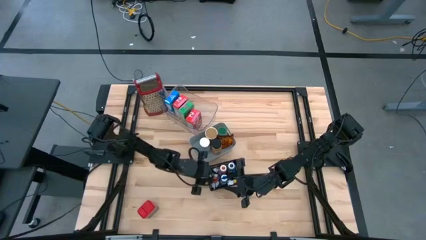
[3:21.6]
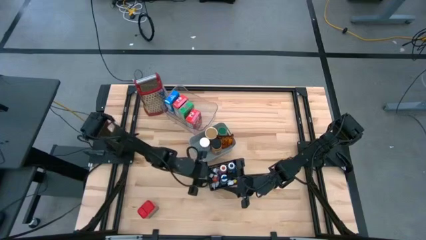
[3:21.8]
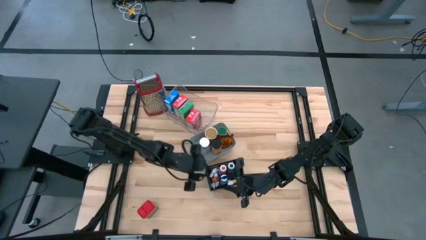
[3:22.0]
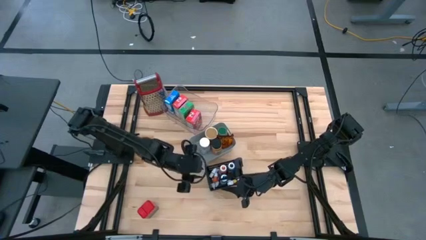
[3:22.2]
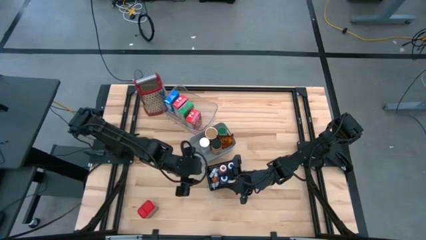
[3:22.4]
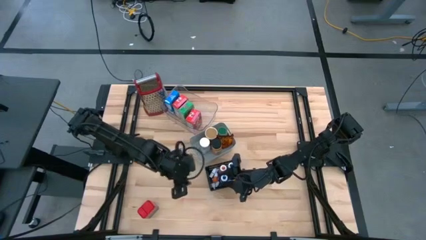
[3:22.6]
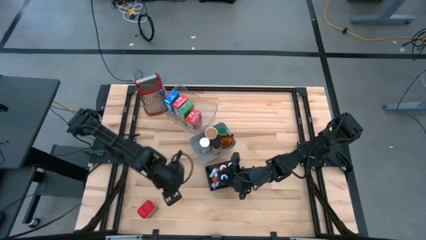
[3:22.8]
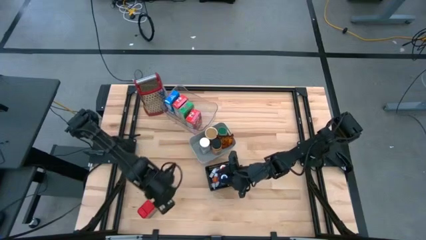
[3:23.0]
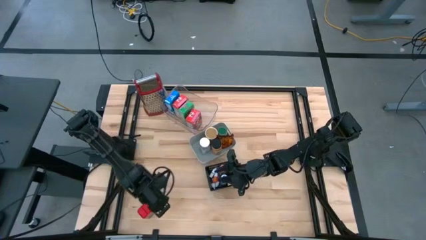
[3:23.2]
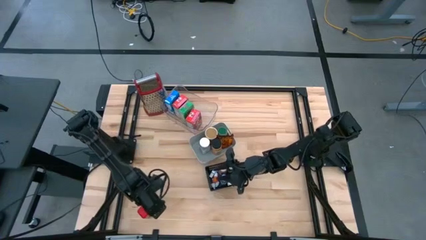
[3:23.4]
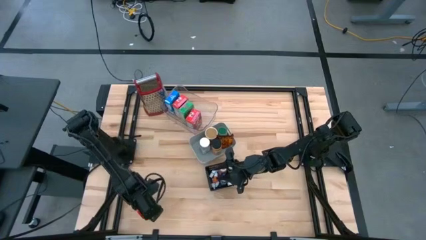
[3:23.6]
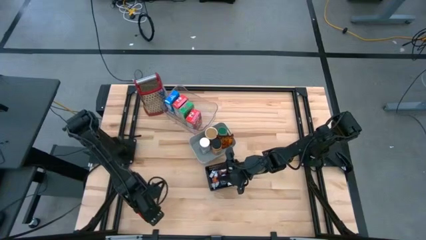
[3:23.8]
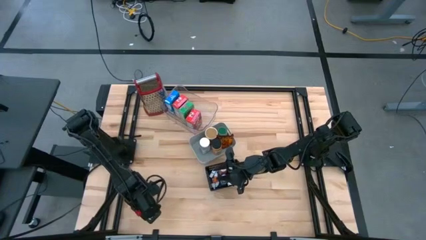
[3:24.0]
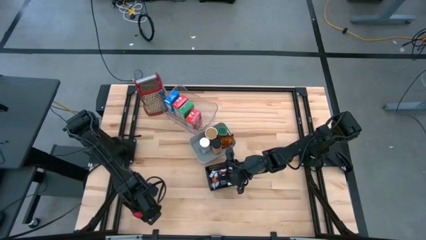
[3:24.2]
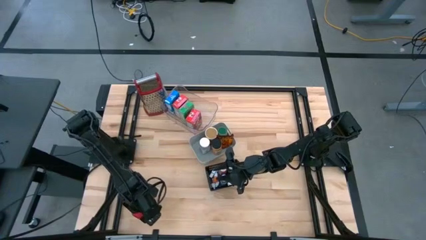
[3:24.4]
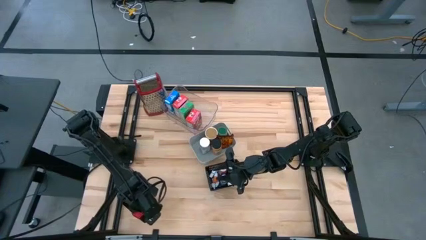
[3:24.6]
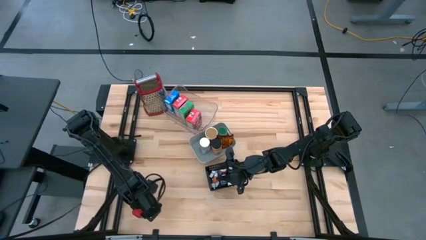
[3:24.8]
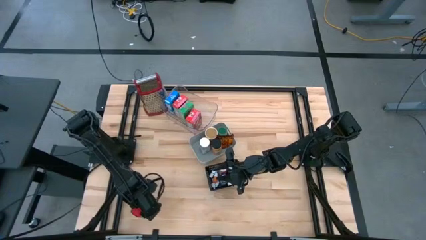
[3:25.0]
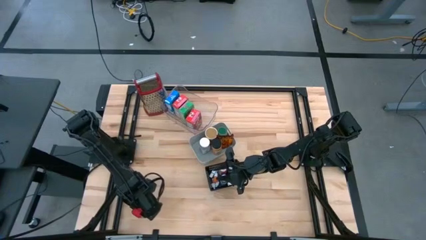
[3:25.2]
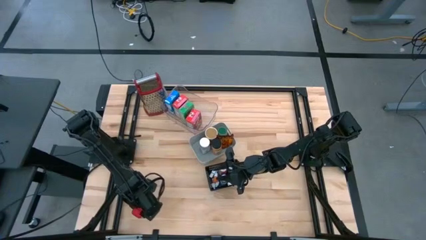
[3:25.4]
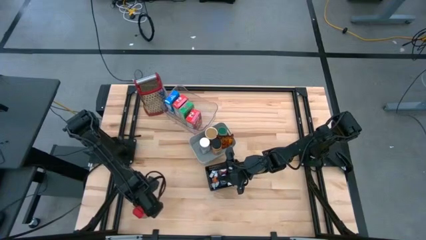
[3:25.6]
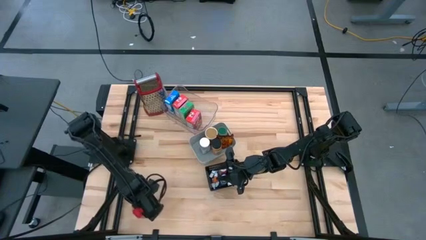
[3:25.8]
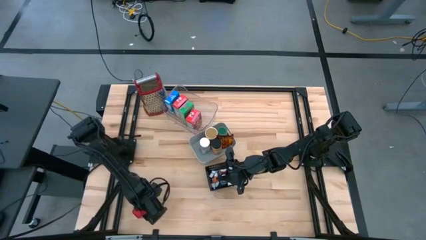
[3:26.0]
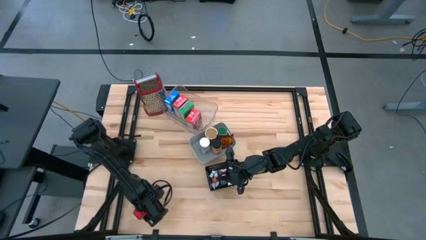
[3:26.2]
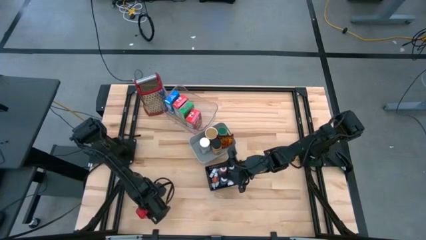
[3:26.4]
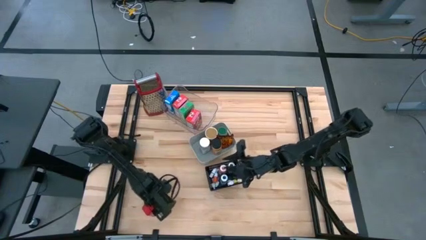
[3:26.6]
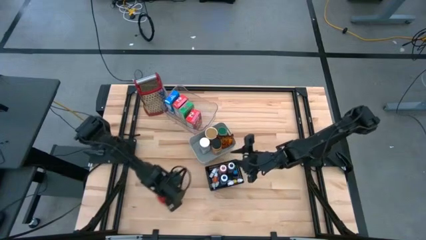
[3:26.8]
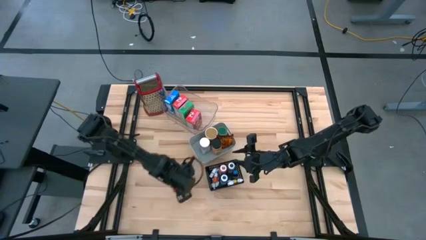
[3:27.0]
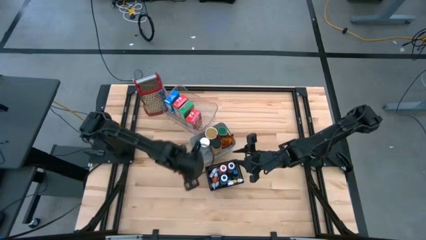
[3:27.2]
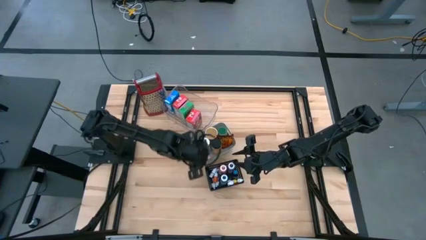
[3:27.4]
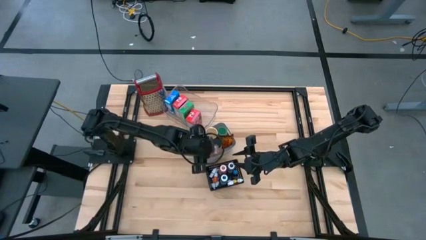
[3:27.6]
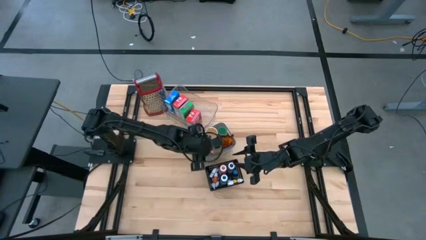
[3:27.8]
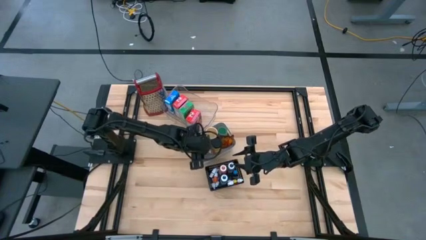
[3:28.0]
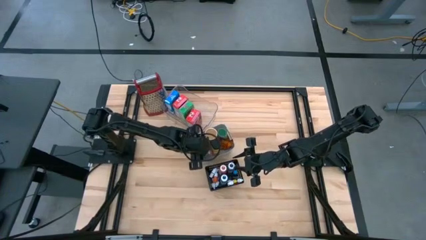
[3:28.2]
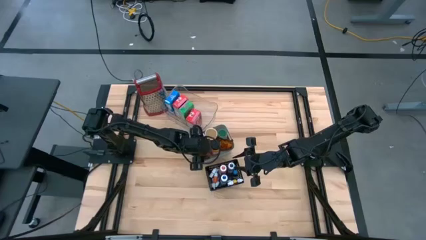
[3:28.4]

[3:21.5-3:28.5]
Task: Pick & Place Kitchen Items
Put the red seasoning can into the white transparent bin

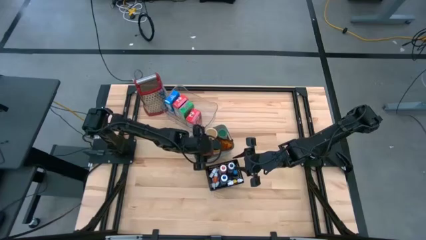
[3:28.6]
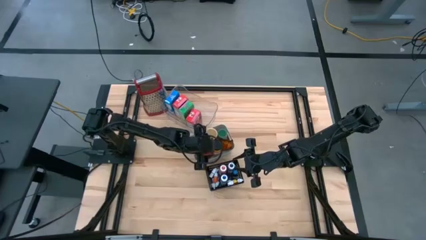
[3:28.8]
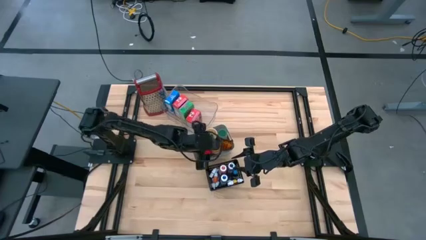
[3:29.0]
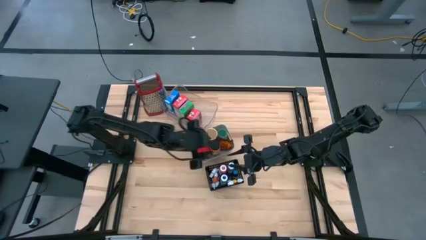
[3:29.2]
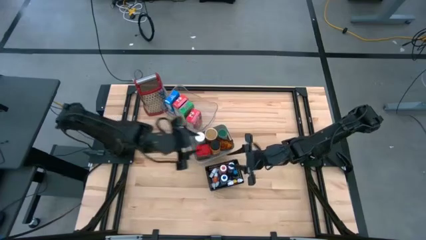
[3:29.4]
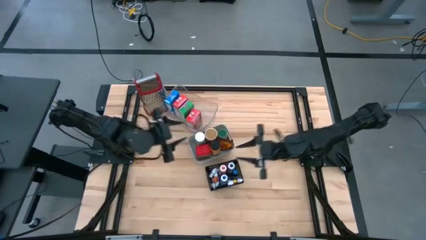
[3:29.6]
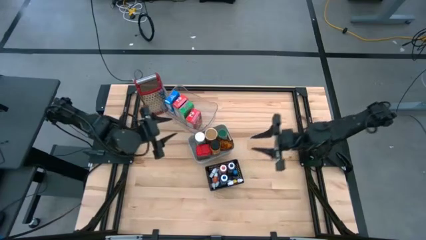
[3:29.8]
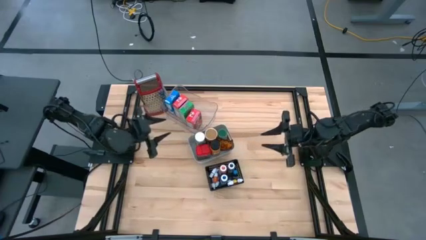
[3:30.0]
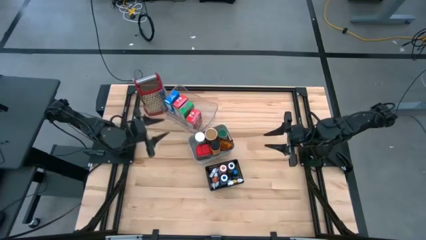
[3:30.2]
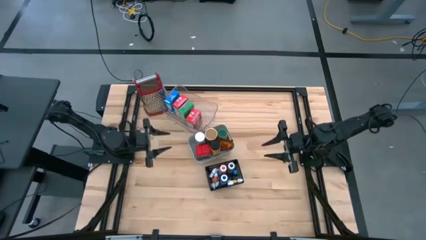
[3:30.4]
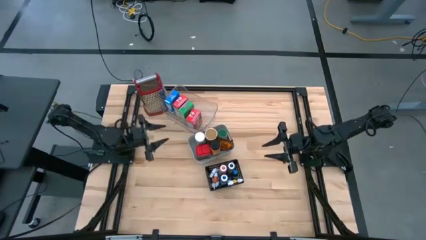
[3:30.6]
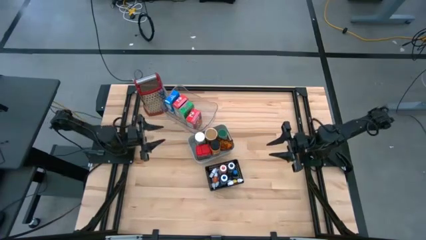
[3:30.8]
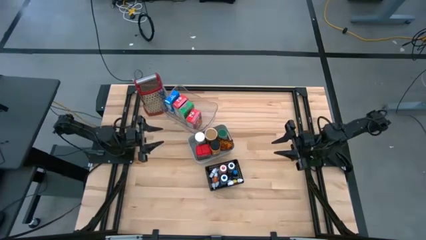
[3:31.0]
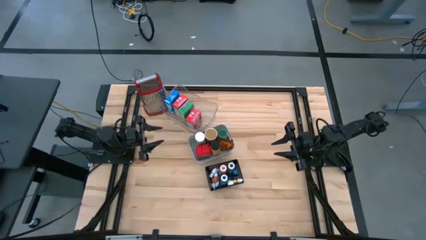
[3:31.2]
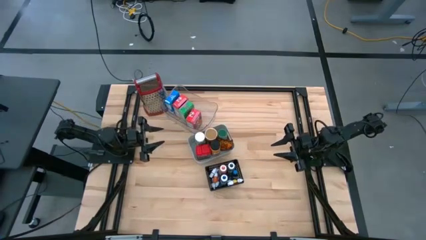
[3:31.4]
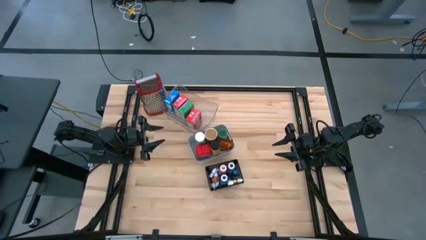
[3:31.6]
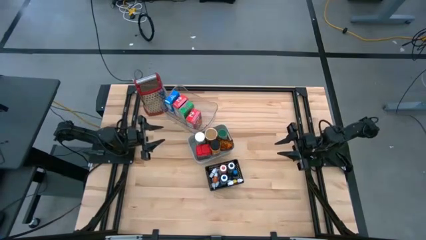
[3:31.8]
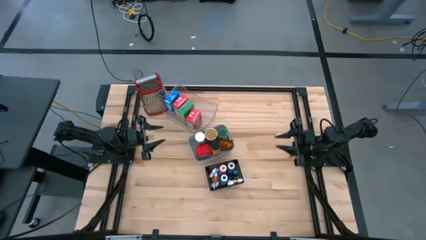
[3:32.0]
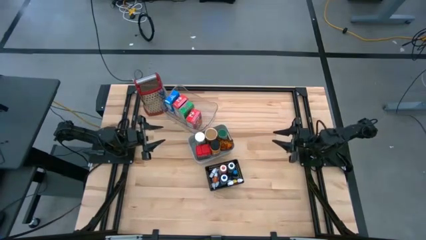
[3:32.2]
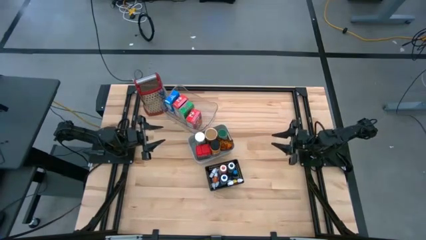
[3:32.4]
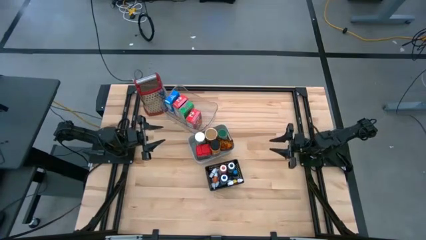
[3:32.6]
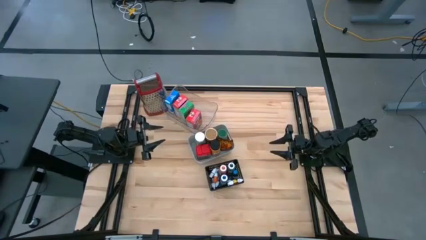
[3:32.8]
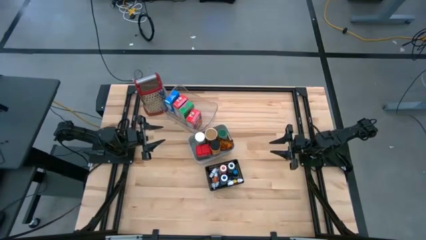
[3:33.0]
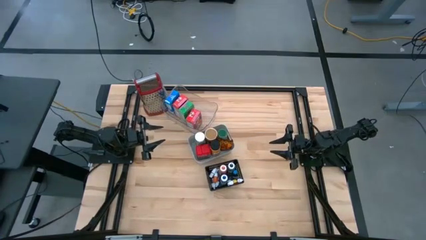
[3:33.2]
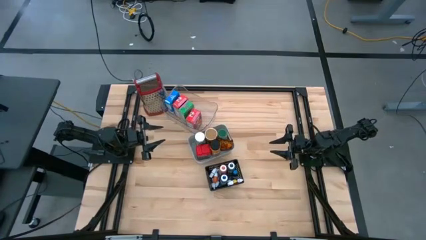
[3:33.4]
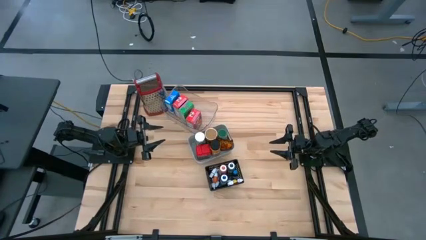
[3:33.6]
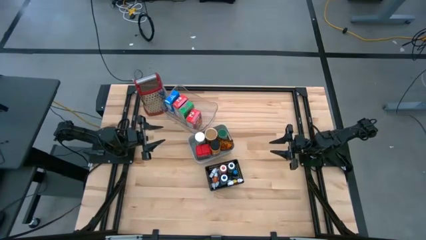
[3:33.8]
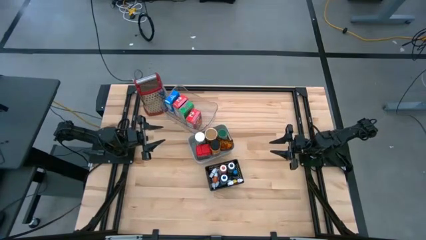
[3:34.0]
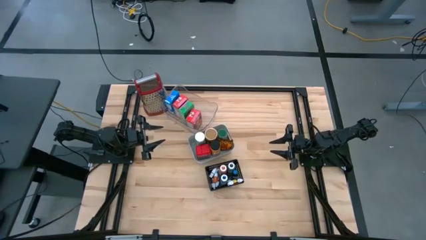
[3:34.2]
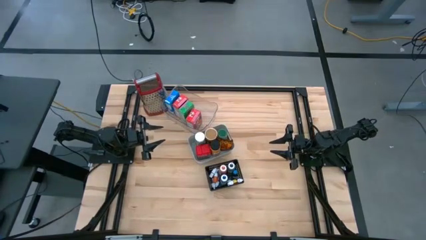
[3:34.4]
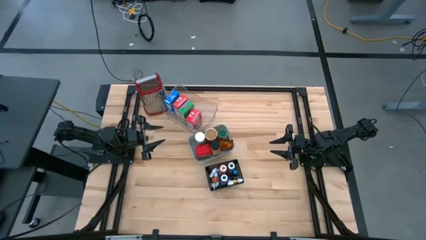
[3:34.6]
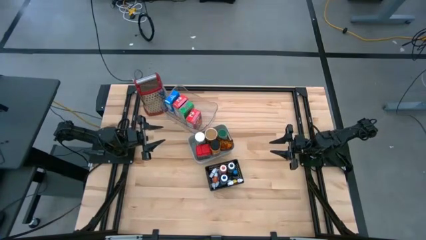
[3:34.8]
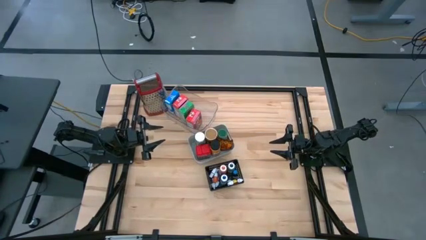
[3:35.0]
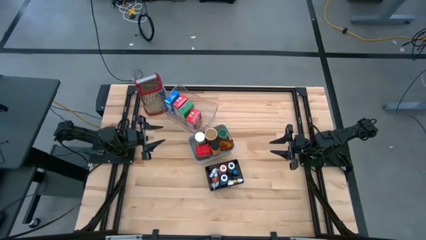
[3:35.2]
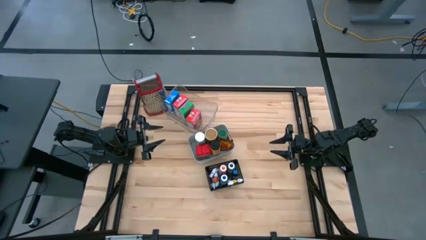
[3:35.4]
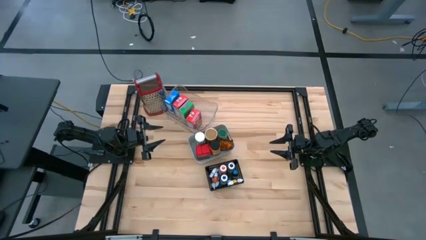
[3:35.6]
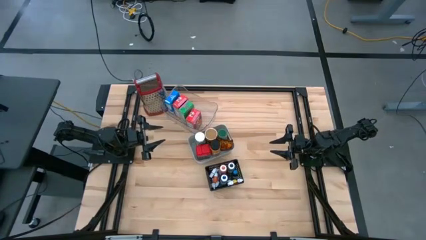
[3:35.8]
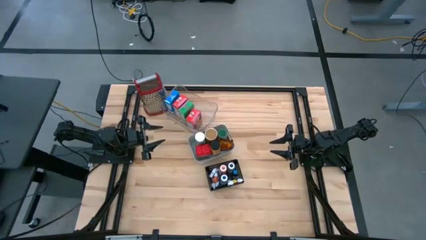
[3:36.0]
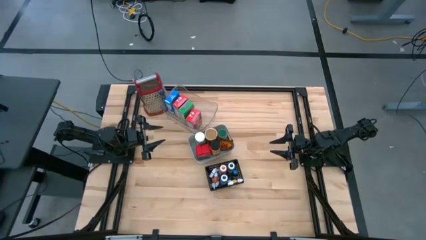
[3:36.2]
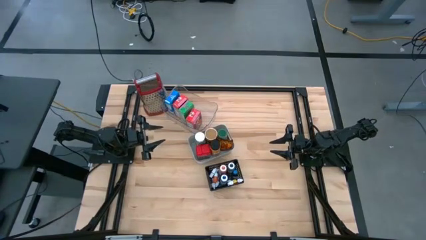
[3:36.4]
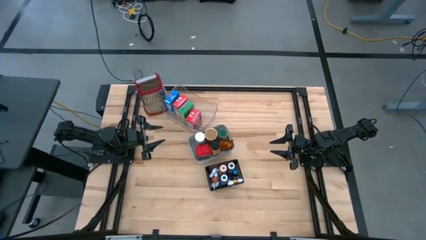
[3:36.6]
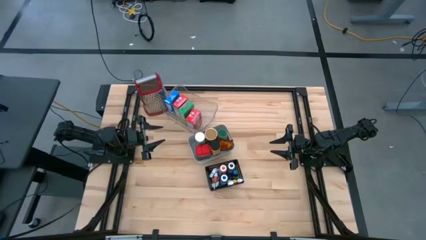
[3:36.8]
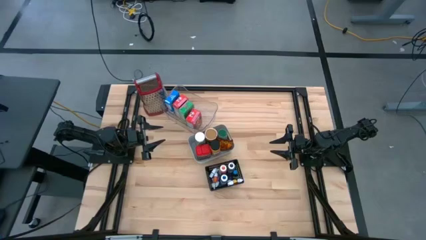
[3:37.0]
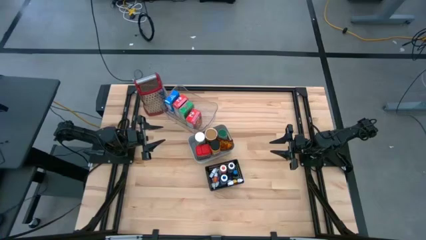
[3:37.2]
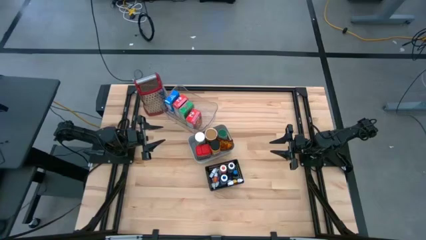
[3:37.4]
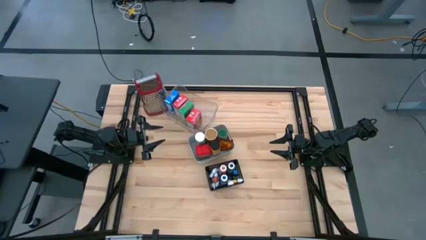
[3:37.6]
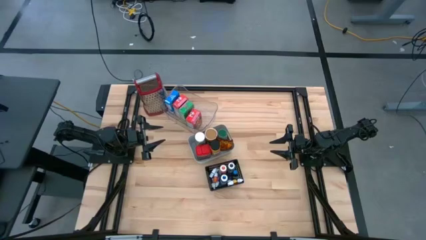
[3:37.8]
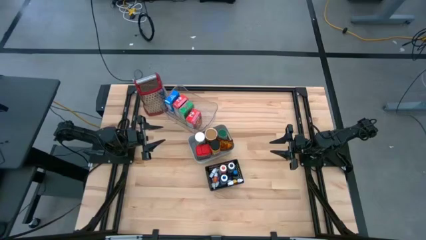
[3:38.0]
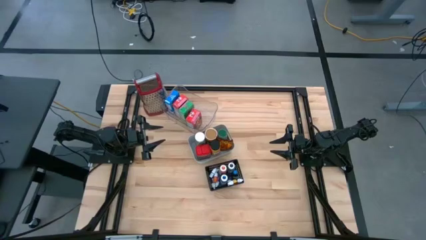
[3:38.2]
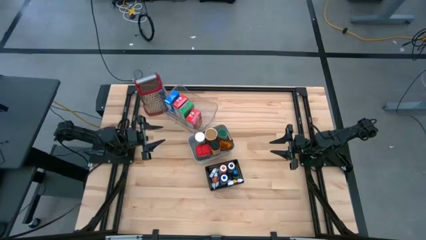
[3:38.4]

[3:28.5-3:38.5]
Return to Home Position
